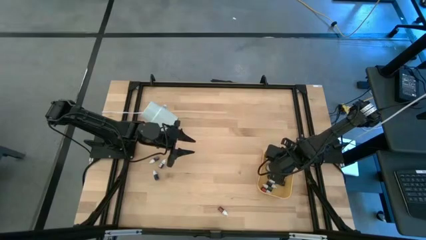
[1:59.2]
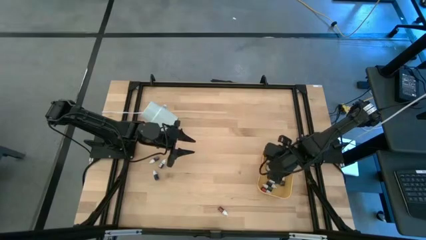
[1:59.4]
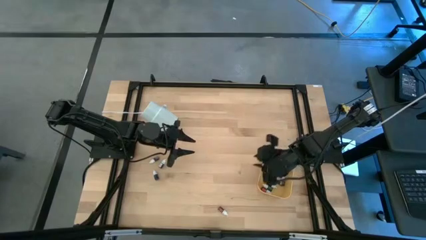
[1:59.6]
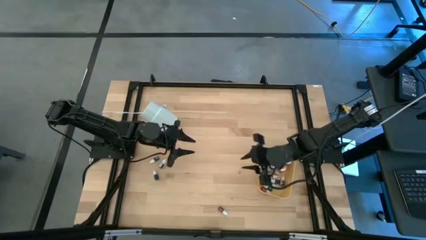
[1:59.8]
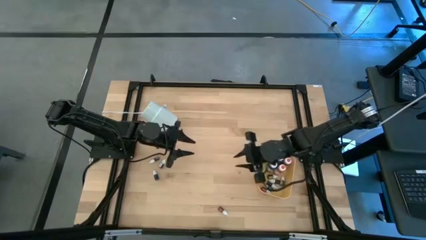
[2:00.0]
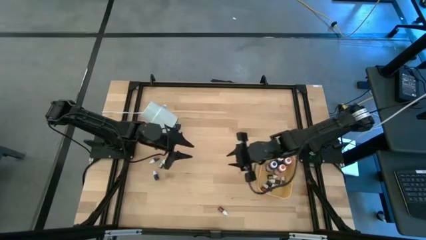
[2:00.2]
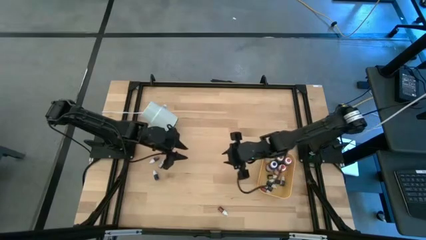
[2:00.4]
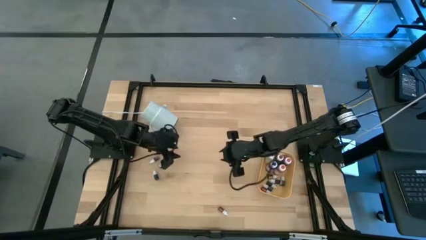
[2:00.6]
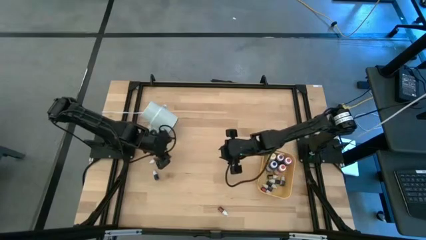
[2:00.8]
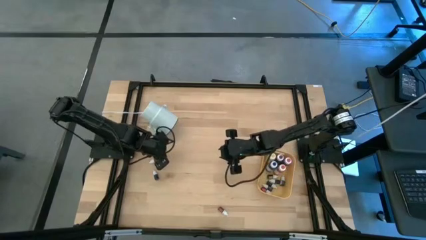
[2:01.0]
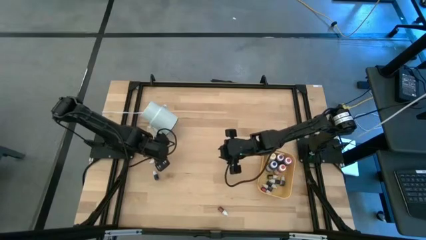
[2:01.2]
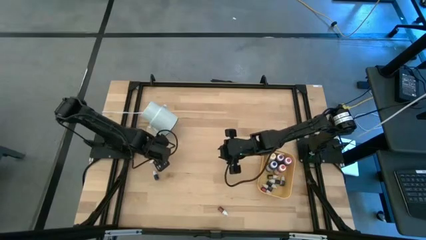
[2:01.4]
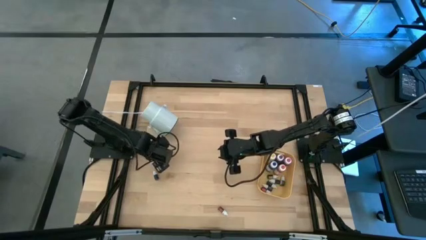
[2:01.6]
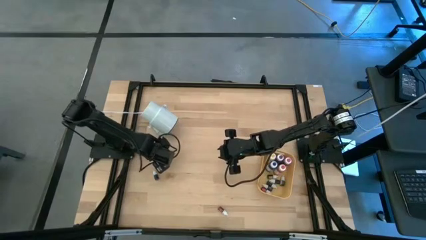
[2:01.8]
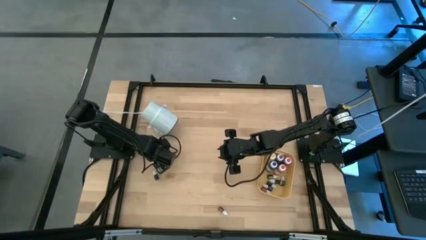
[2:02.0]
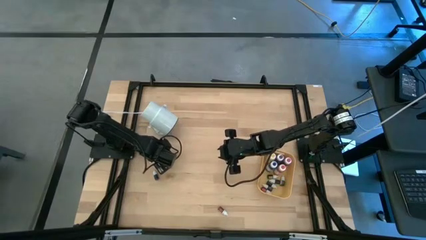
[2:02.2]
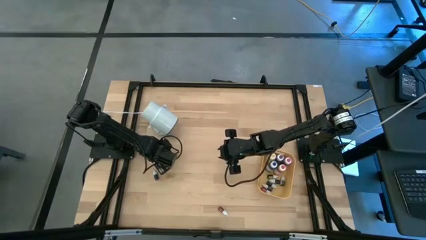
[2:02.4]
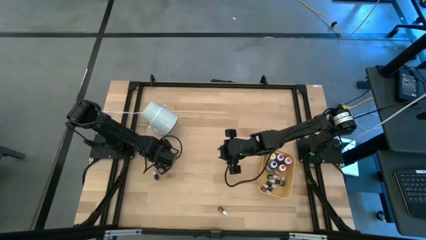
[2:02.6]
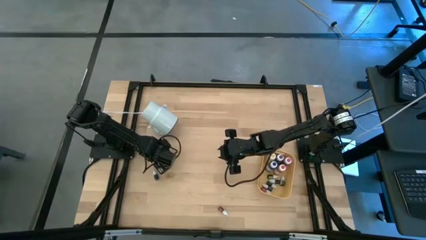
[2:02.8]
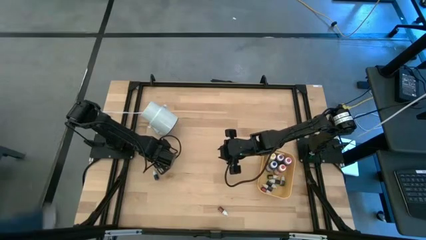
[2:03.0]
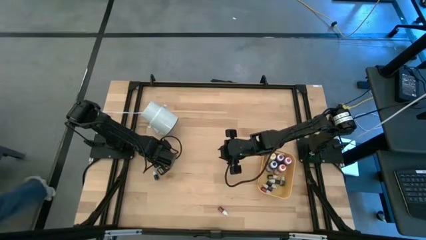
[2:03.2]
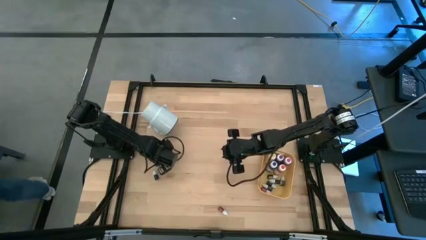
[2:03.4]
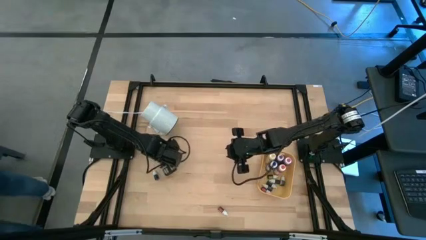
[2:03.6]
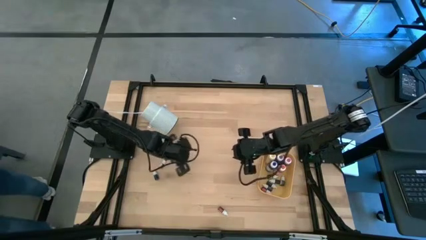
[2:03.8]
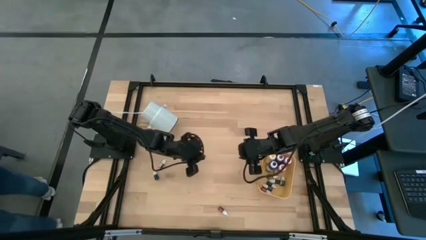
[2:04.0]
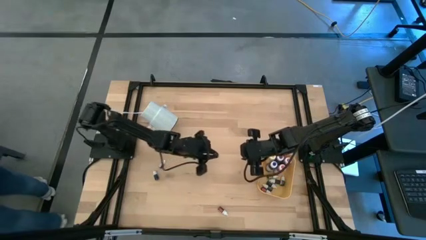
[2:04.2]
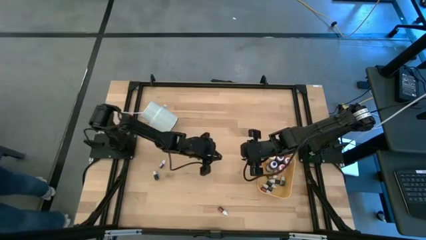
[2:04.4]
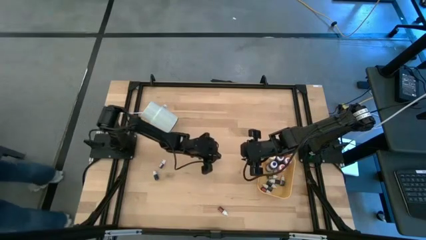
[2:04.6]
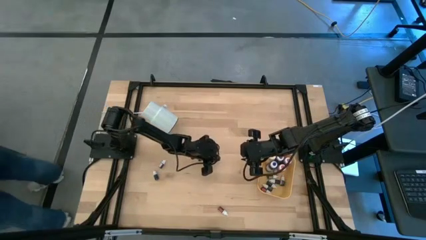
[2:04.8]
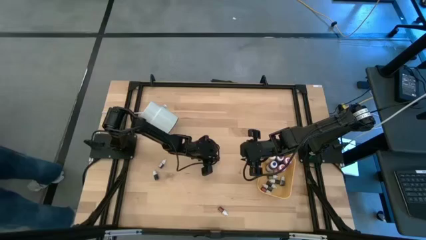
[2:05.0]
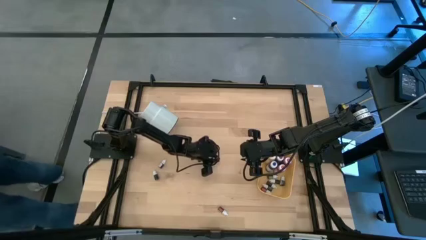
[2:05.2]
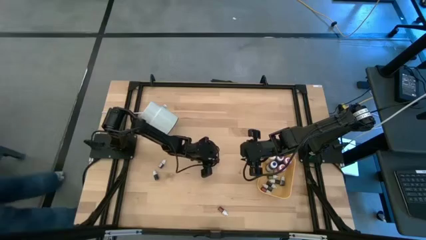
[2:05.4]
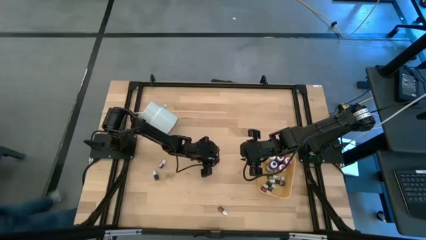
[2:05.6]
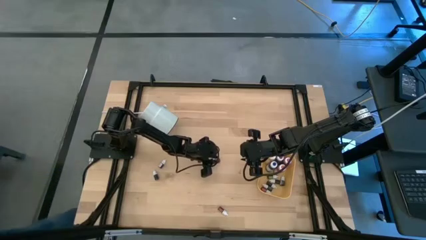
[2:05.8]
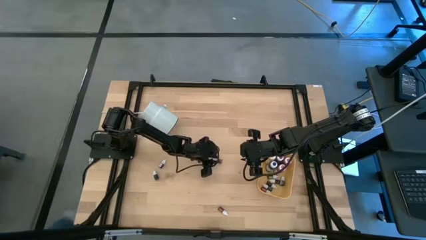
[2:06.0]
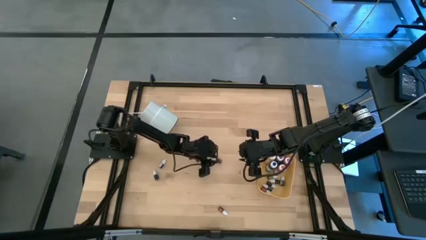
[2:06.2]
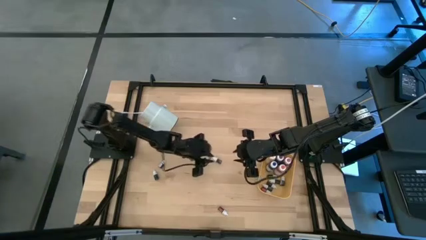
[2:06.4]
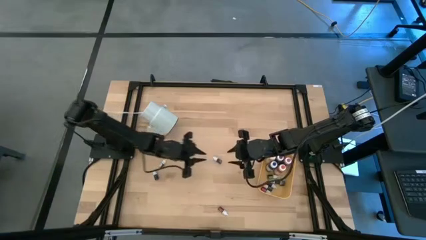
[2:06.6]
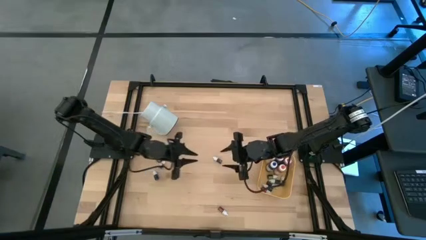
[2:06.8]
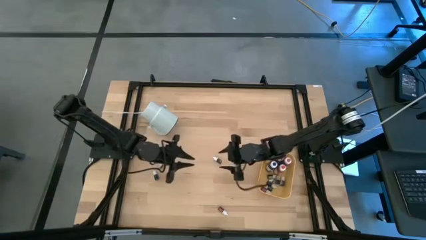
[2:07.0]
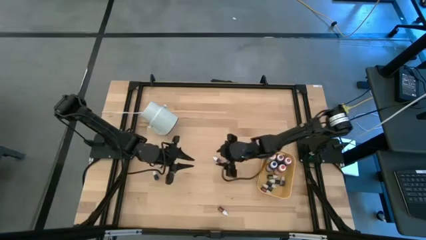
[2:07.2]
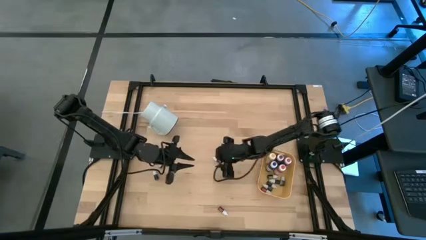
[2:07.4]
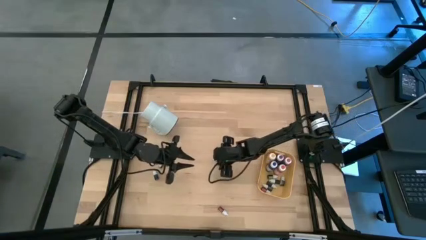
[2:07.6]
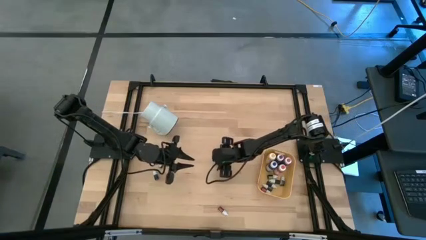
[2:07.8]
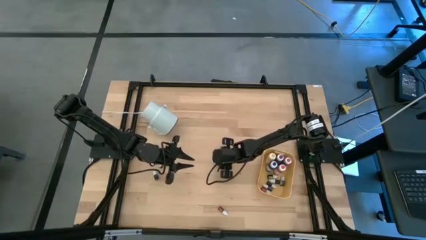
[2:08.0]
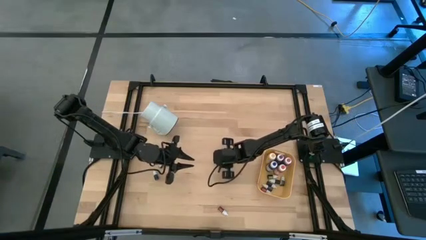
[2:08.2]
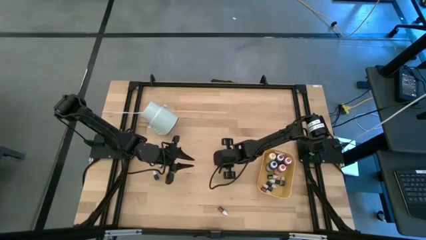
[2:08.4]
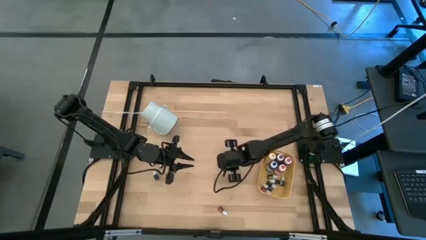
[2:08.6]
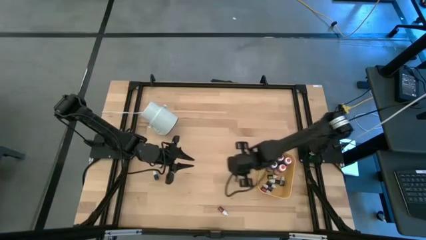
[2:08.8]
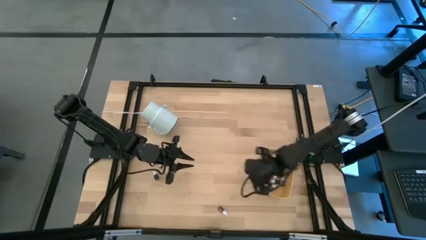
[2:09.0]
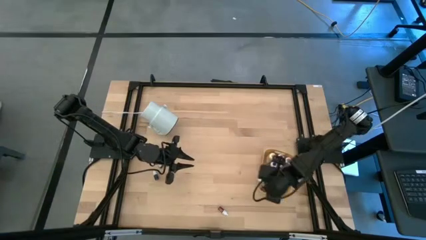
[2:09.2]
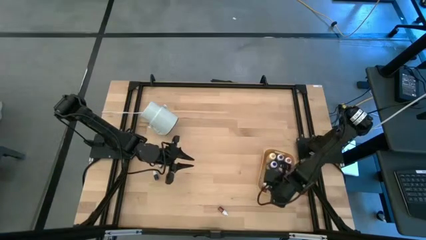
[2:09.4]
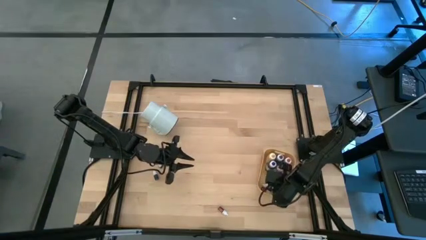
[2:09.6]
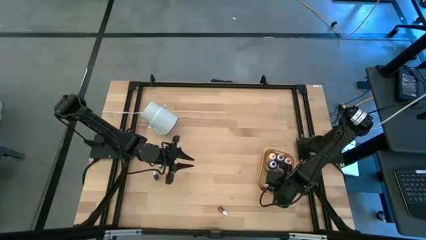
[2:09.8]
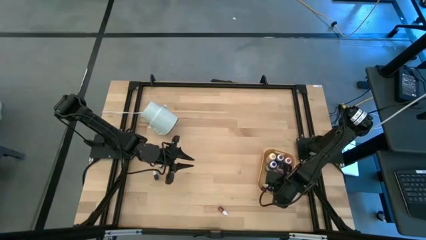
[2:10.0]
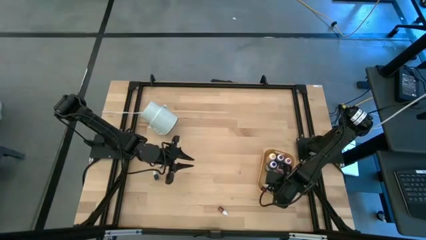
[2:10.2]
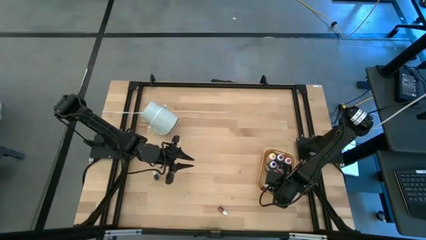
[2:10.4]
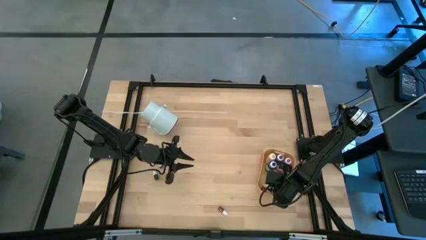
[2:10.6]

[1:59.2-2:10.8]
Task: Pick & Place food coloring
Put the small pink food coloring bottle into the yellow bin
